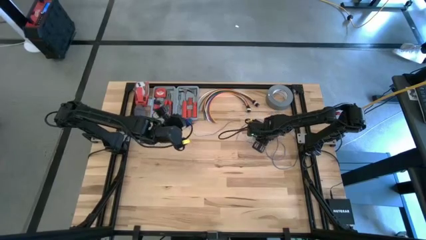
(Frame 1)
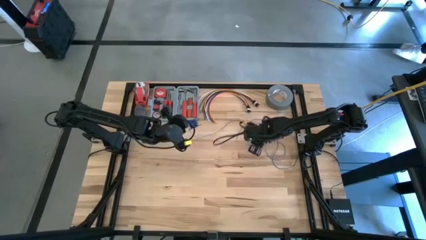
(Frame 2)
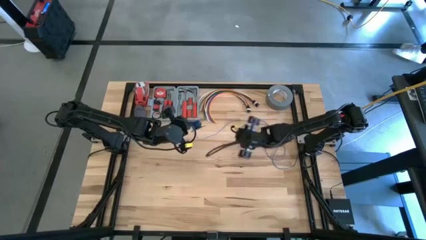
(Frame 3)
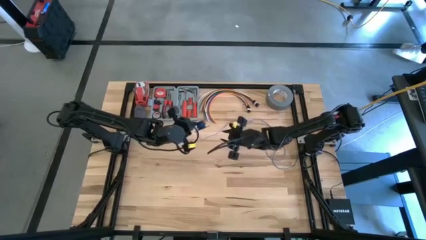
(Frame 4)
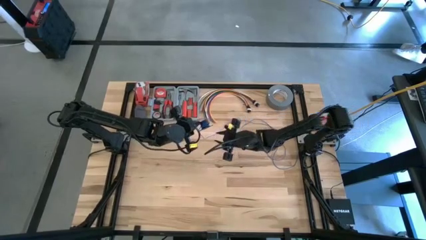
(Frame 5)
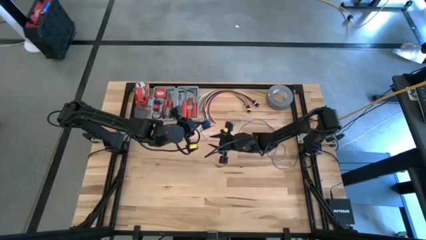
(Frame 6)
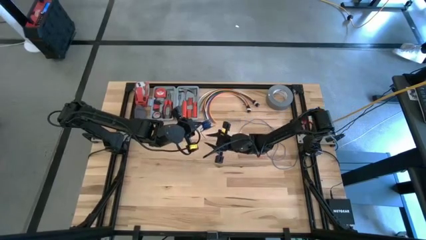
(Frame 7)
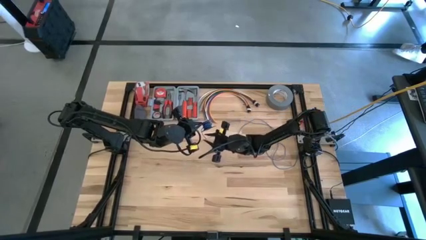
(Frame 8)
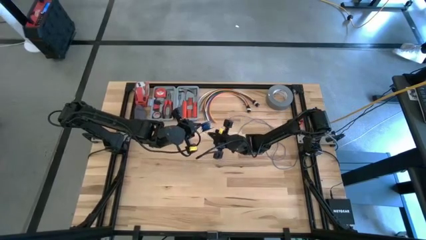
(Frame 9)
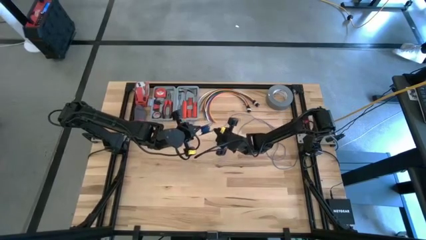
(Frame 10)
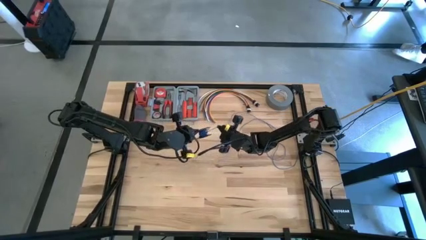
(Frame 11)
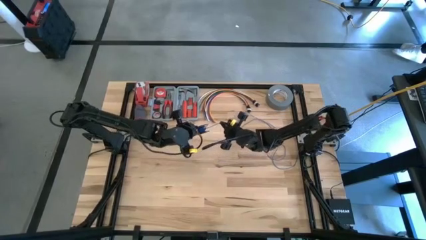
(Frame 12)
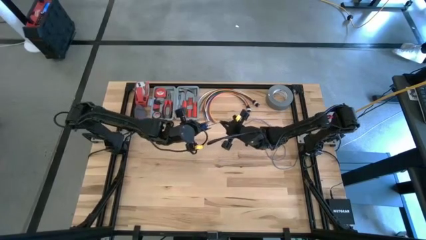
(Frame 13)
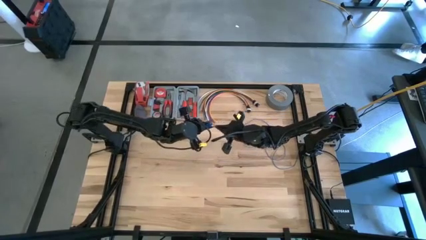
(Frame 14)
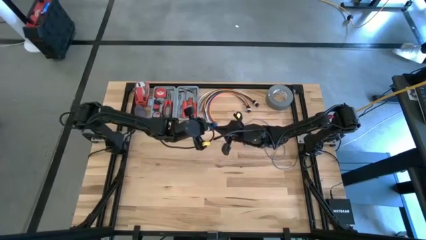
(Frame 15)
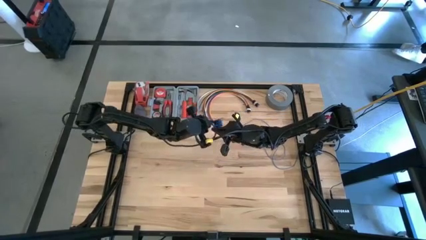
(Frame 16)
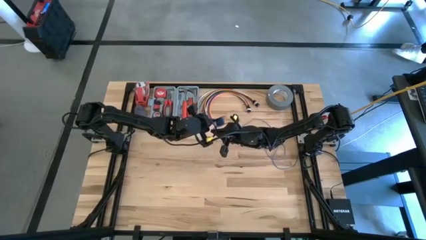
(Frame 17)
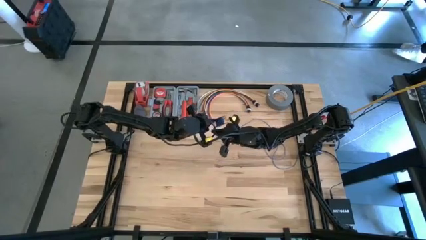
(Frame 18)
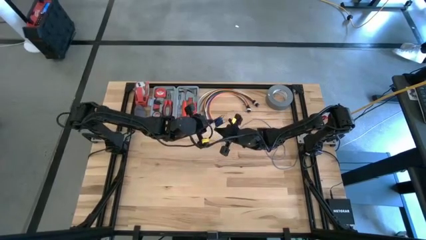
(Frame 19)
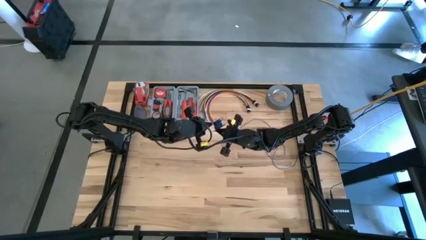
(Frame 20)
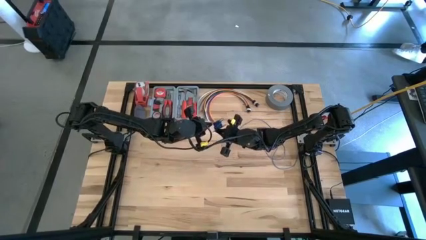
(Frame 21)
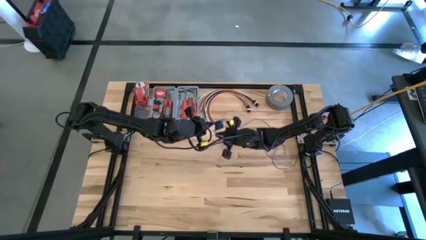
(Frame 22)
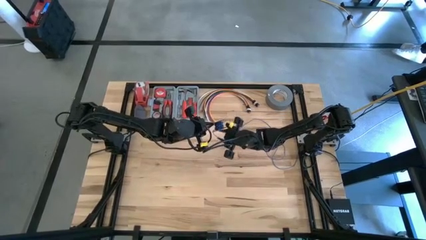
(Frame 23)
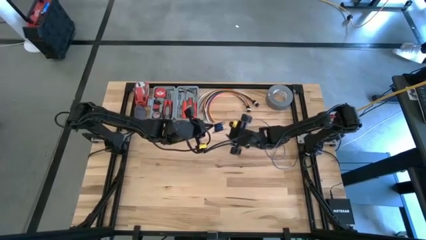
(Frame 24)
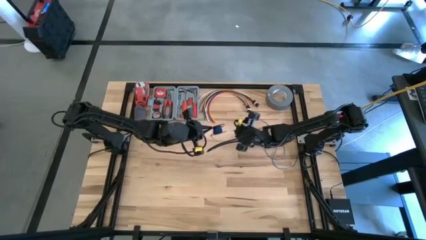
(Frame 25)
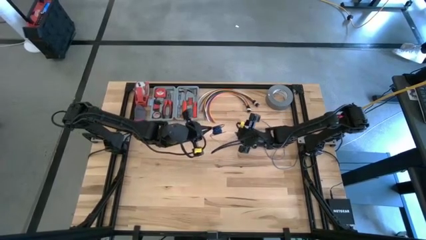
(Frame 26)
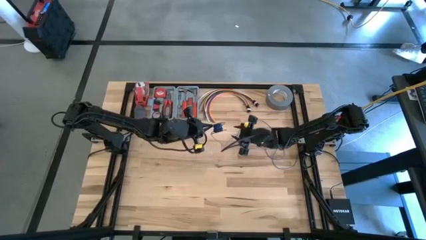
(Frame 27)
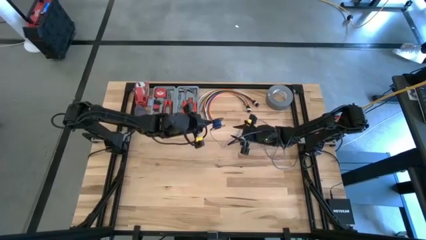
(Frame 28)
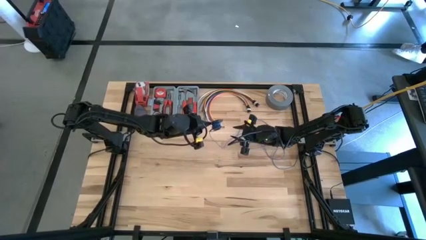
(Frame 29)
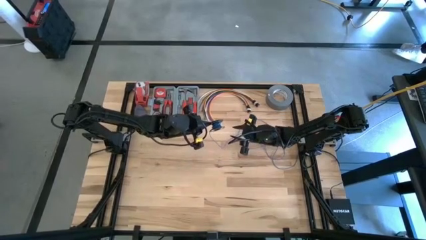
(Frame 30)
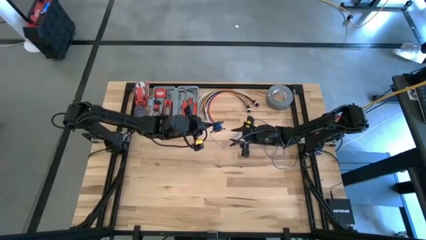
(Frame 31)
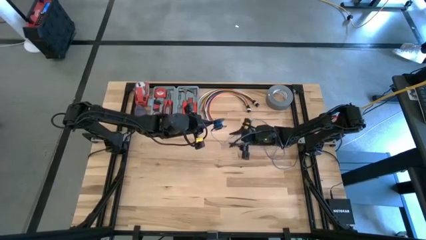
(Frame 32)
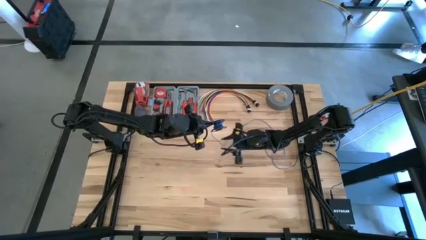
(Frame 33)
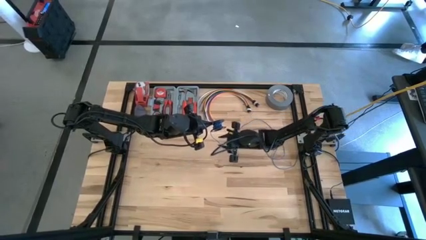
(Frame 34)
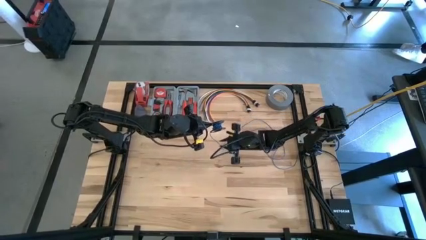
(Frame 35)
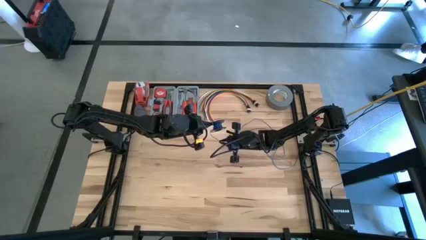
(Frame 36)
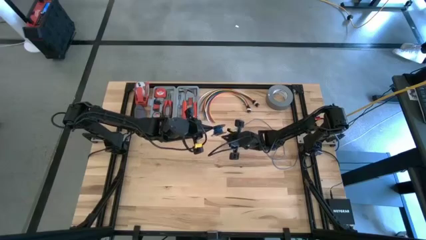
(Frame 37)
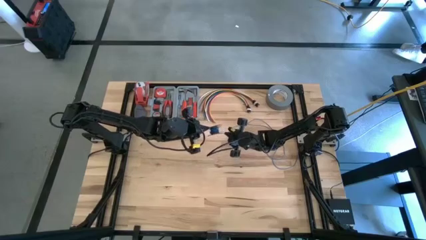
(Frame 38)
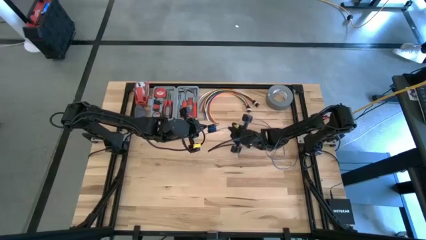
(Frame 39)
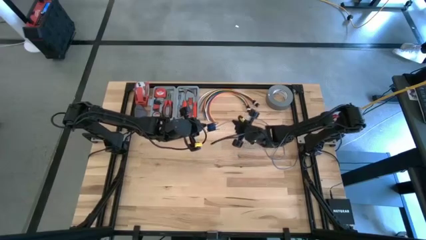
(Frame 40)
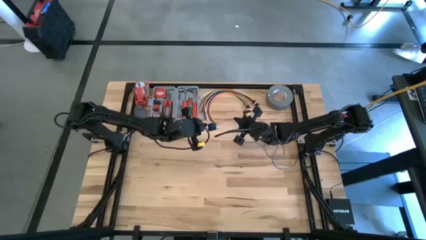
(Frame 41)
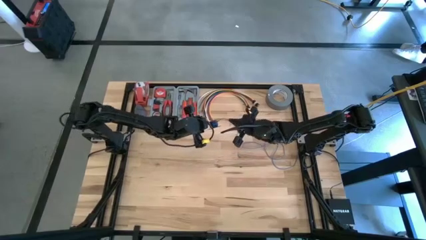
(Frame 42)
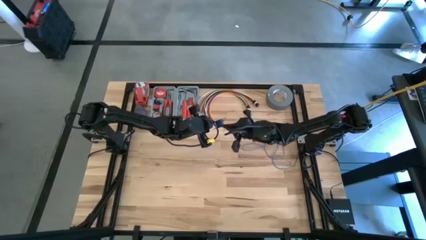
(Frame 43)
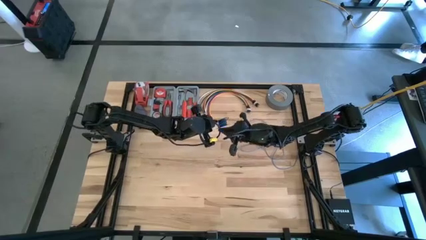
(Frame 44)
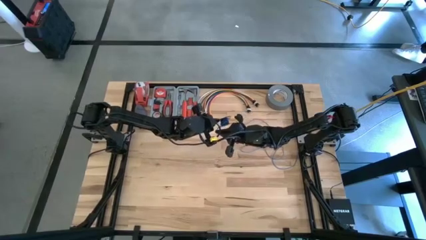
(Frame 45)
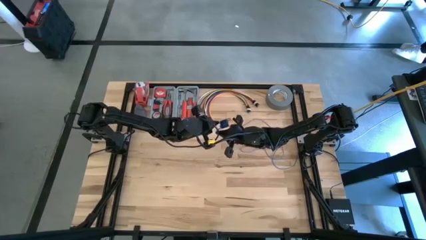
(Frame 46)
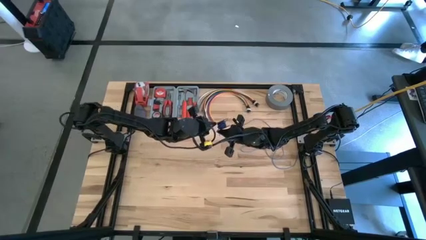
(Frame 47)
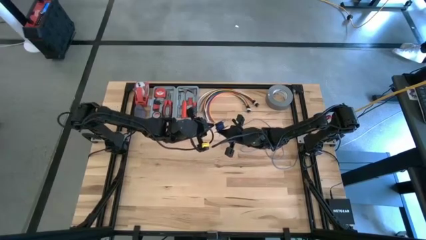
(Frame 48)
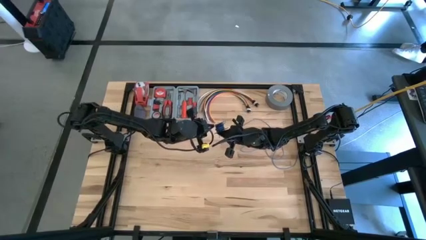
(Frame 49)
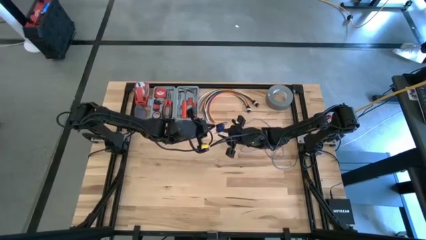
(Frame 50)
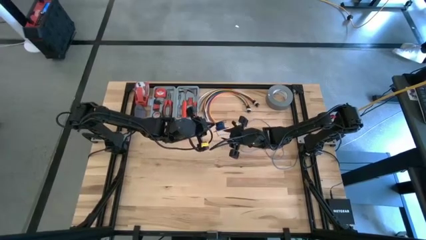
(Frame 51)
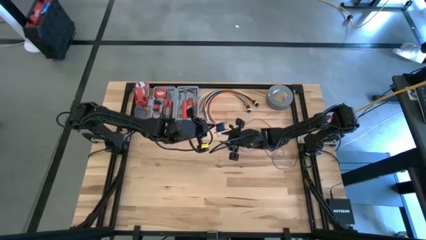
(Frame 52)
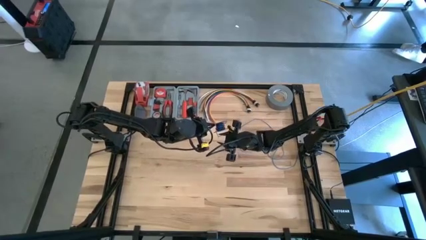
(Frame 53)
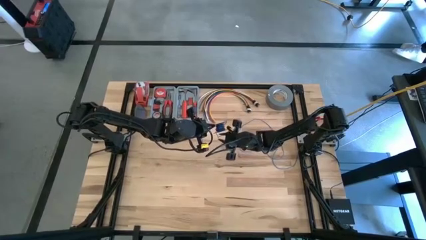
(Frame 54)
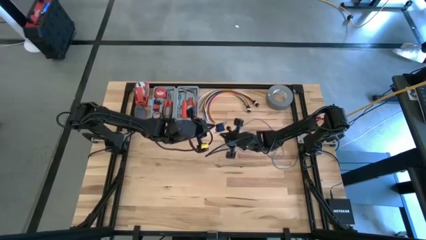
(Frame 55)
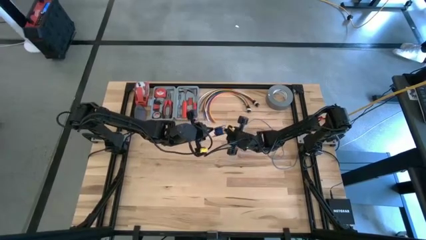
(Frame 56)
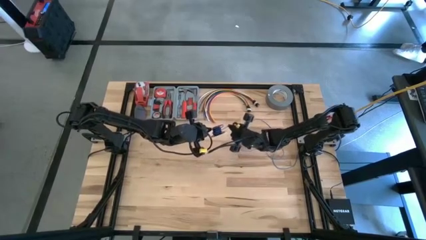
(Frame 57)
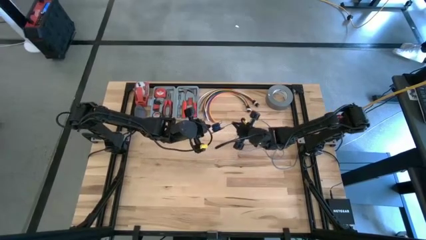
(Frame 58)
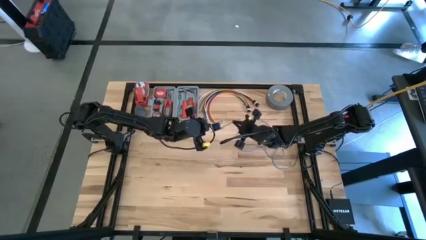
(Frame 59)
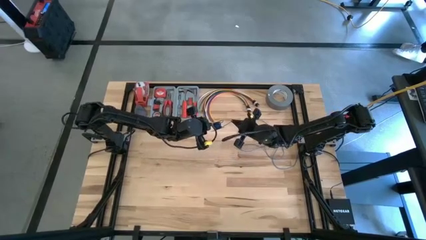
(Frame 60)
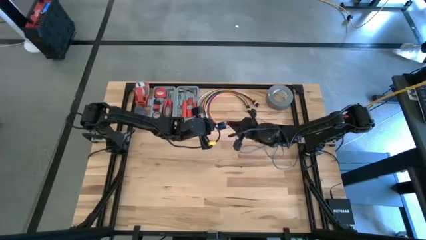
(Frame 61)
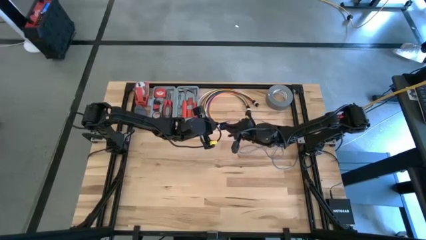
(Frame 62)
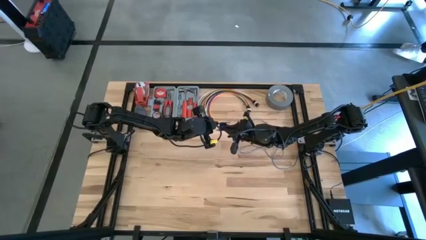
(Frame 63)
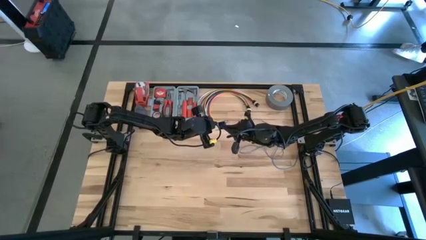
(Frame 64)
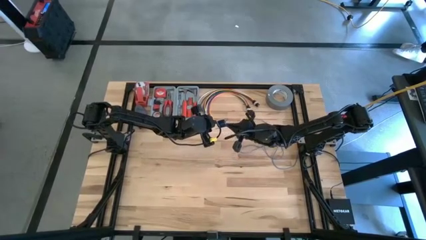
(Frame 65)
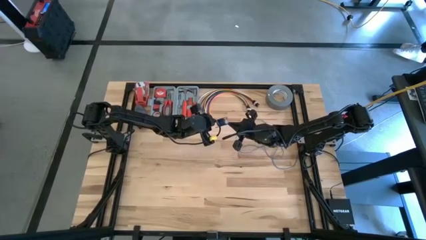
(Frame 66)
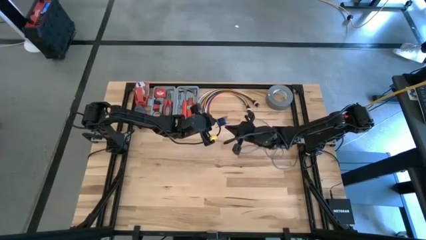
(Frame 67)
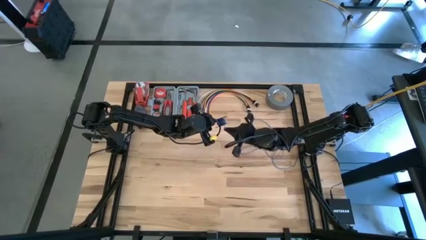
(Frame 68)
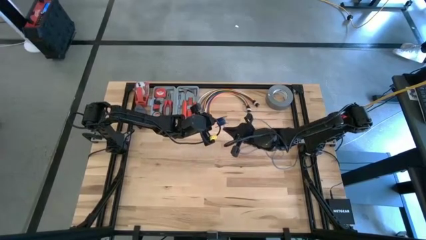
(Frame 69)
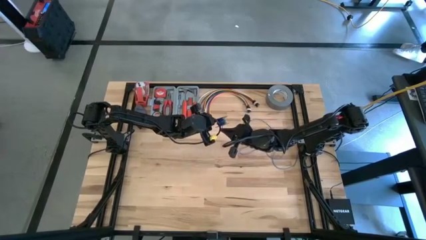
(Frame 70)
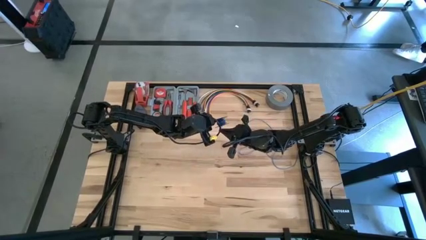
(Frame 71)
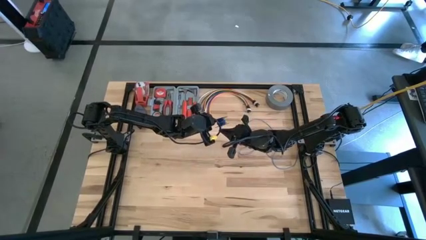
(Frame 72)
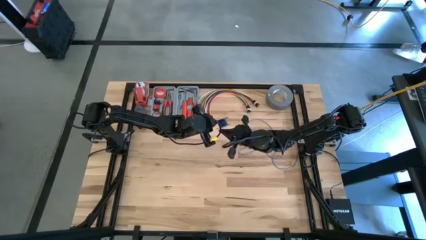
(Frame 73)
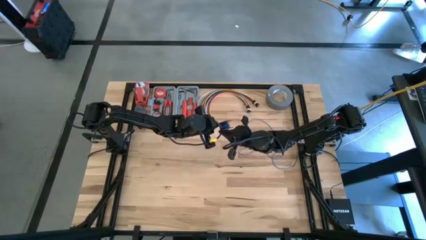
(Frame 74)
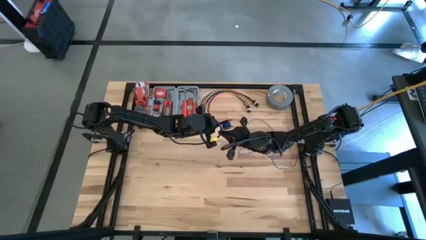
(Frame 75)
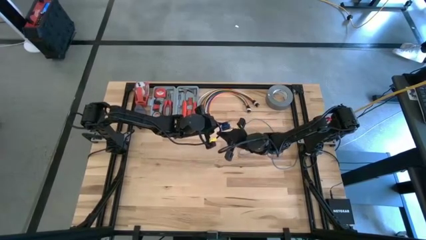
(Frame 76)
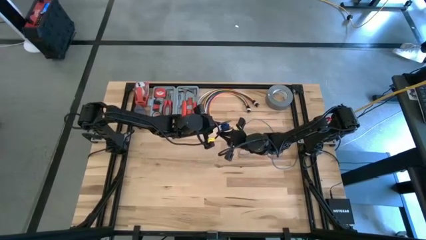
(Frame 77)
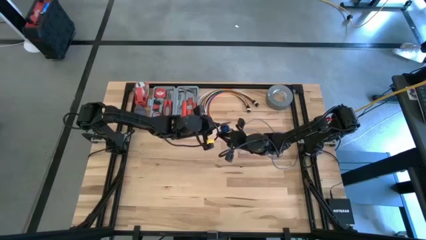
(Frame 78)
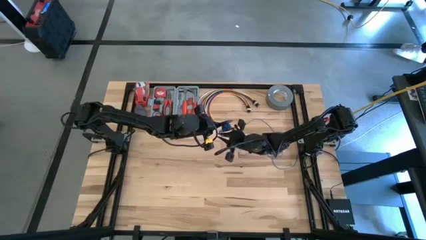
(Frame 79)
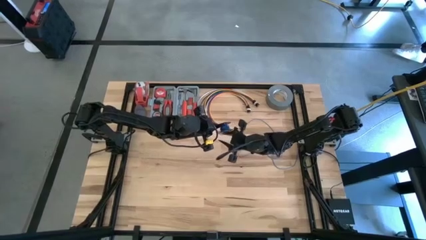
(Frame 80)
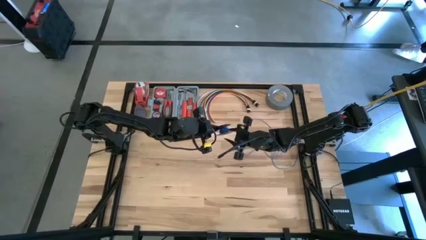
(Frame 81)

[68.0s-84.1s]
Task: Coil cords
Coil the blue wire onto the black spool

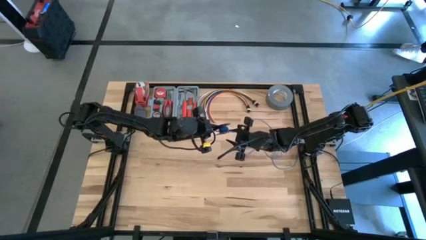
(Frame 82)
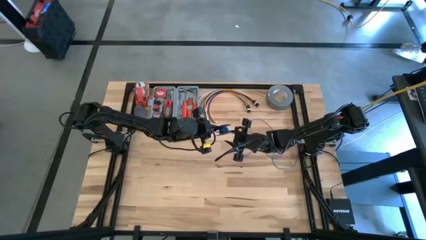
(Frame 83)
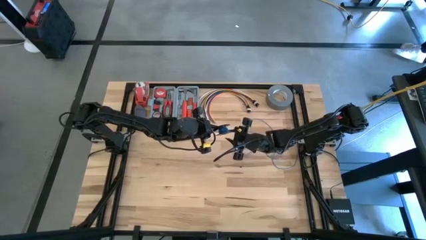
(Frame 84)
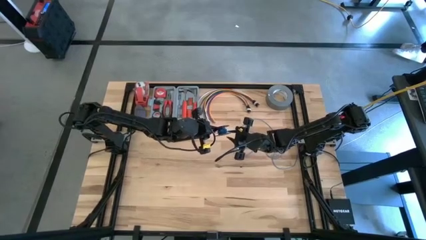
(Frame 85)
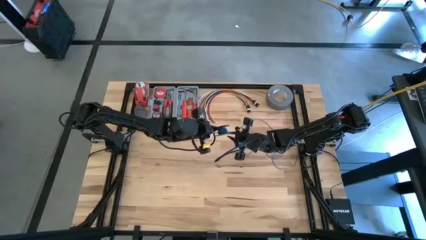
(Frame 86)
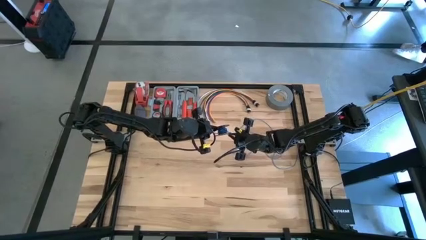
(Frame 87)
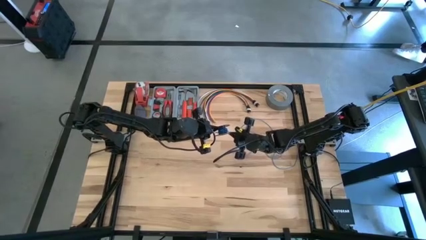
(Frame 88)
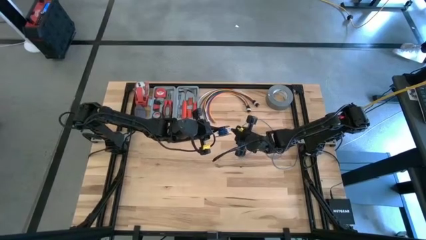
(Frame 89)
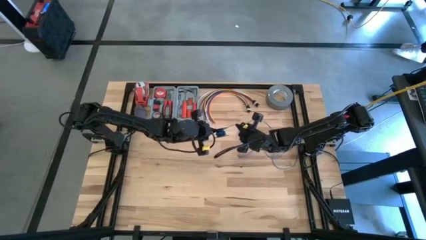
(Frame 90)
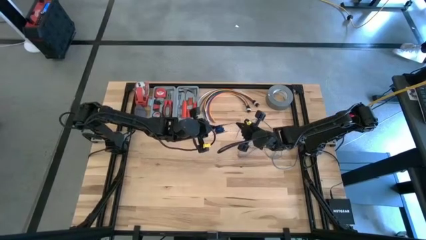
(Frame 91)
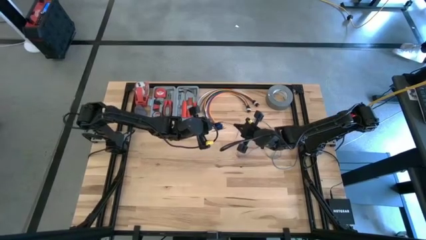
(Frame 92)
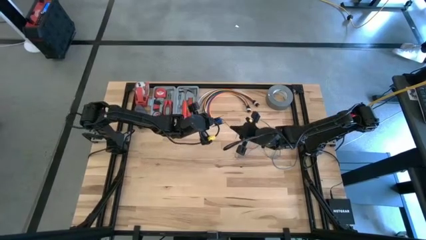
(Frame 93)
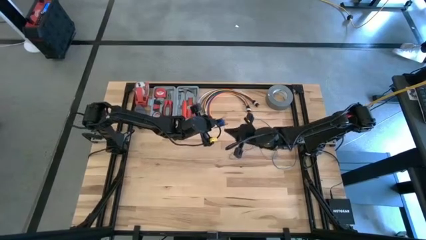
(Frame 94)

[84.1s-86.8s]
Coil the blue wire onto the black spool
